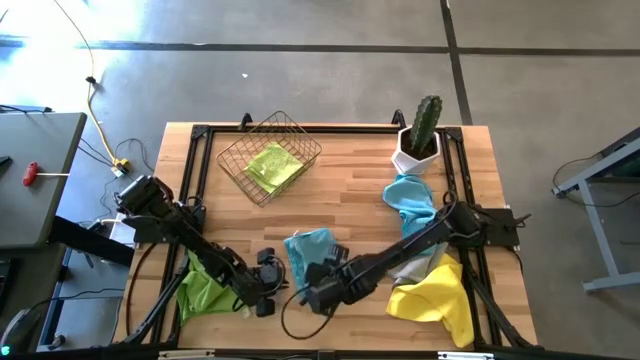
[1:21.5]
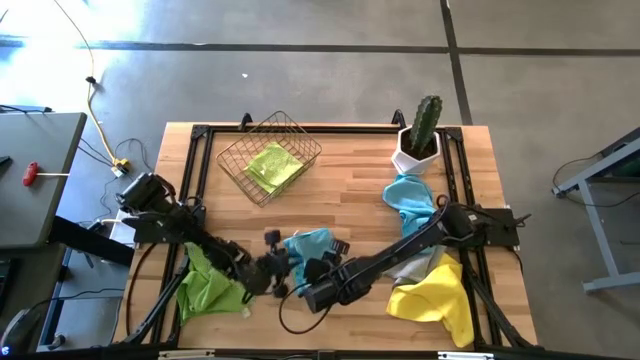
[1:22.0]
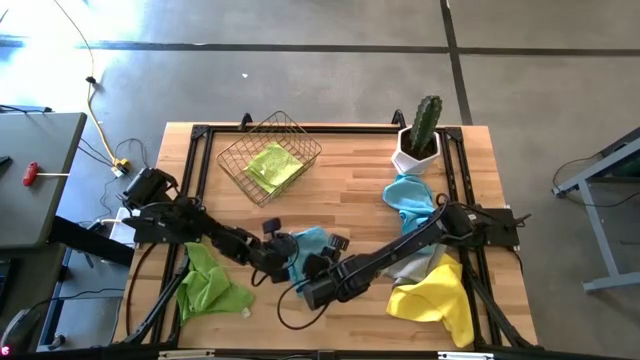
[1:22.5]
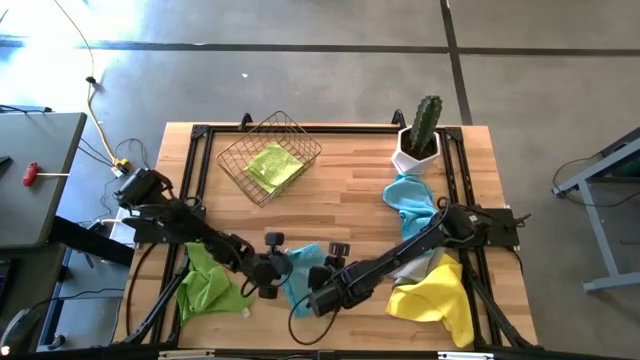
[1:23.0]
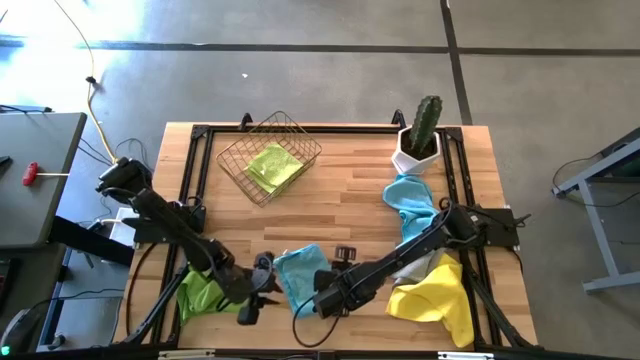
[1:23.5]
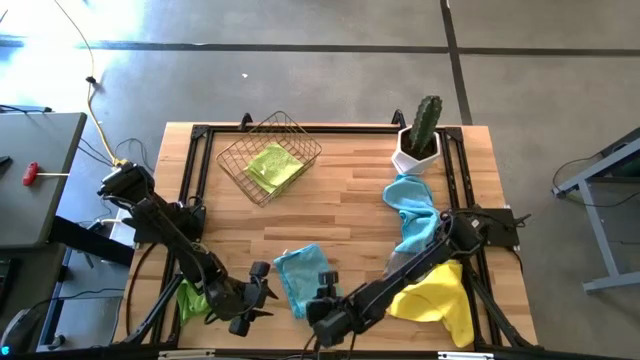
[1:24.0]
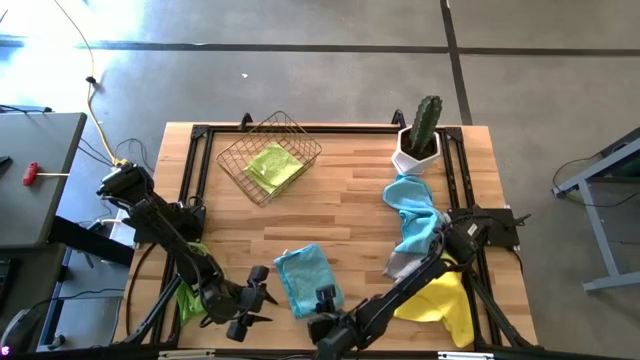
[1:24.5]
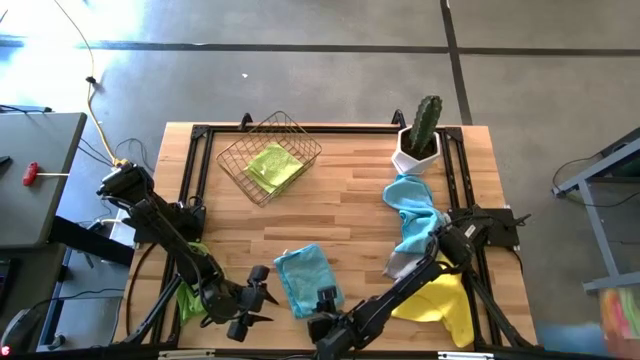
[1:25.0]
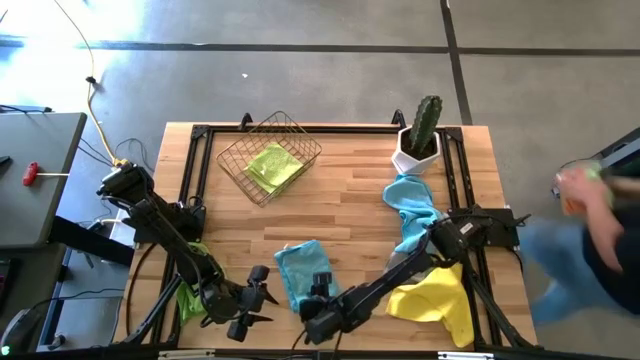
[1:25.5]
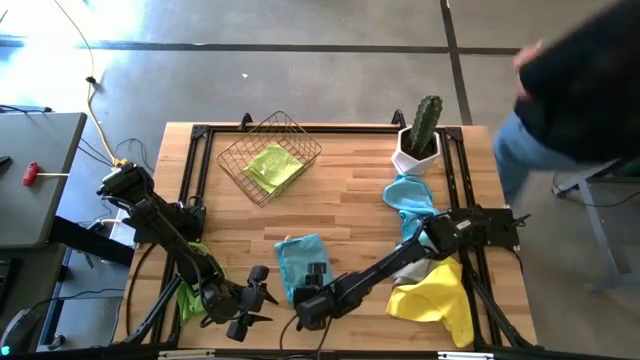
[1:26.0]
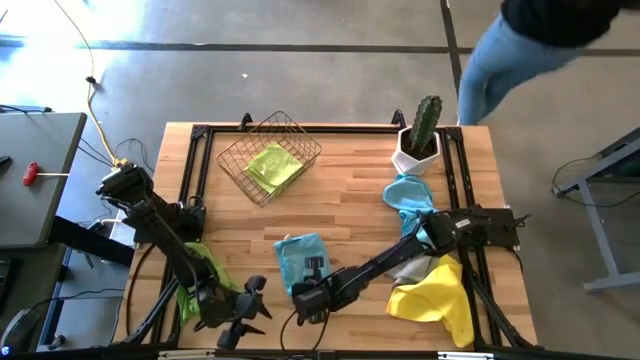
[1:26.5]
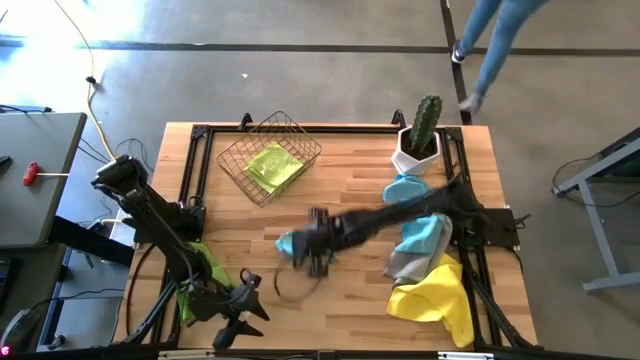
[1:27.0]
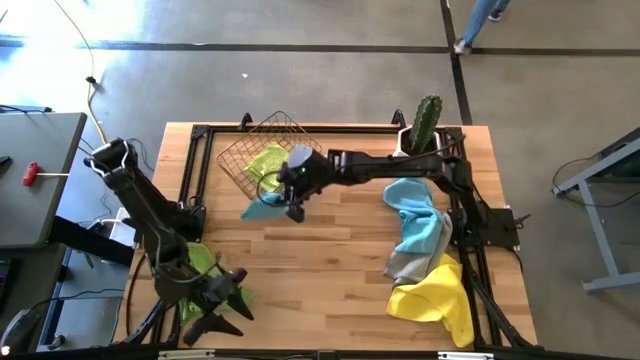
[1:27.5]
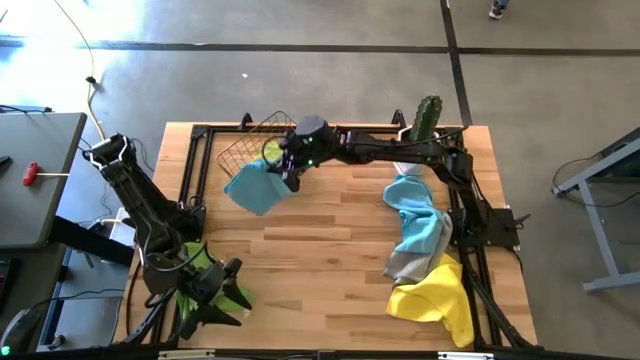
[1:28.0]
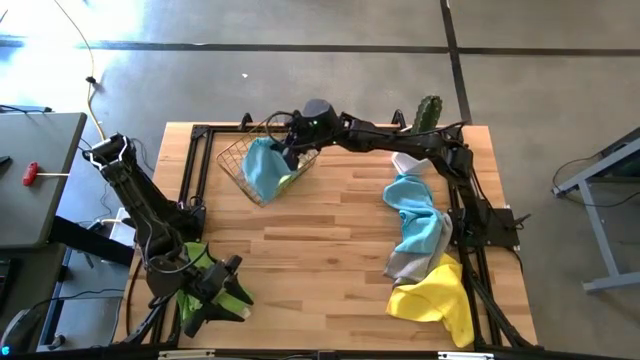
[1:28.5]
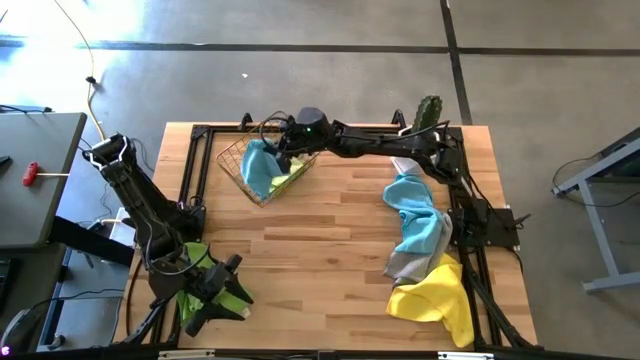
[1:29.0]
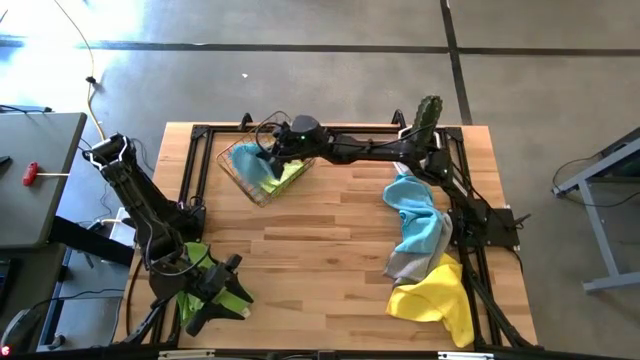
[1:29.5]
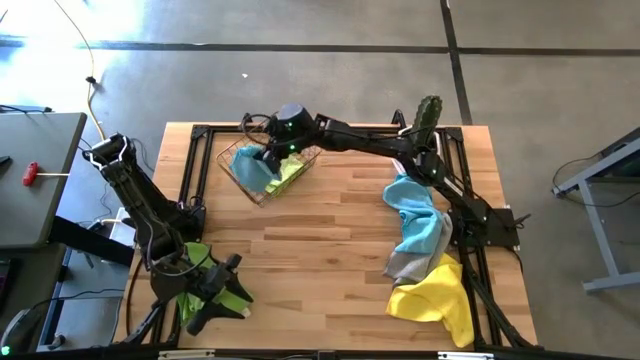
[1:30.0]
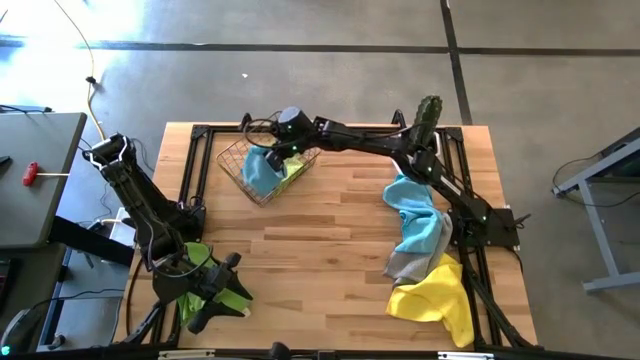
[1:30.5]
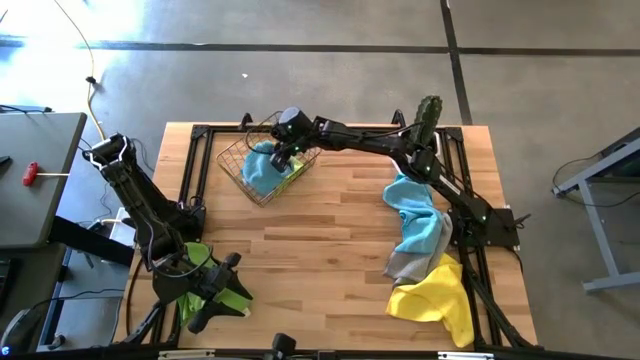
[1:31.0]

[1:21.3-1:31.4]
Task: Fold microfiber towels
Put the folded light blue microfiber towel into the wire basket

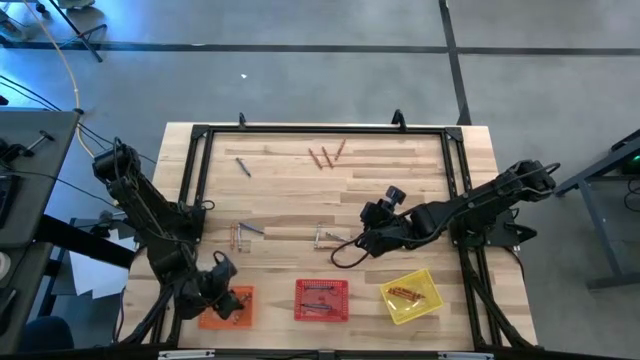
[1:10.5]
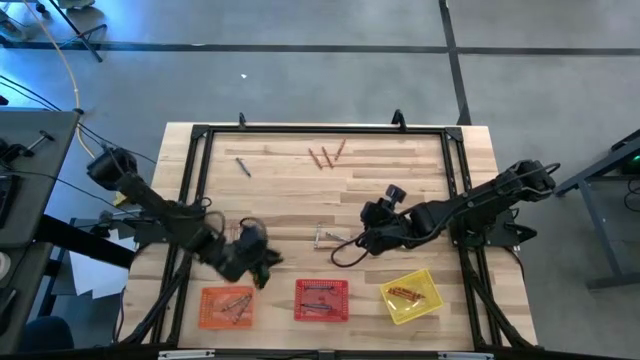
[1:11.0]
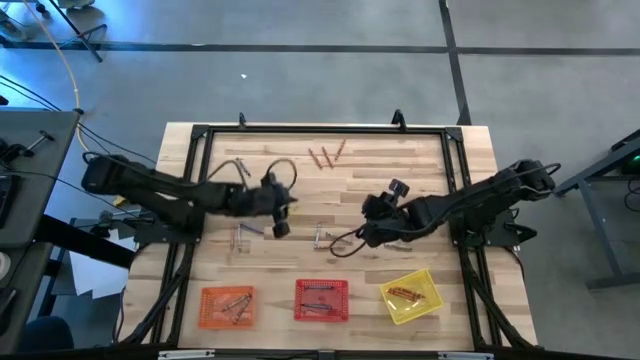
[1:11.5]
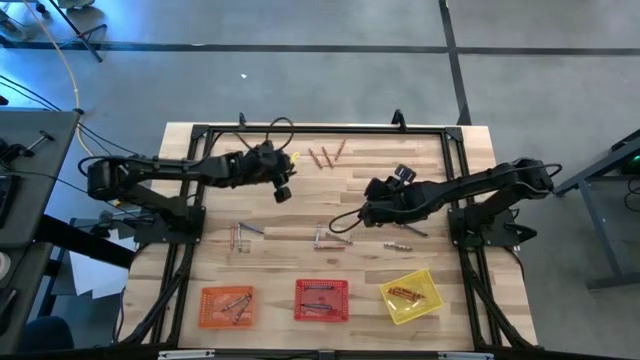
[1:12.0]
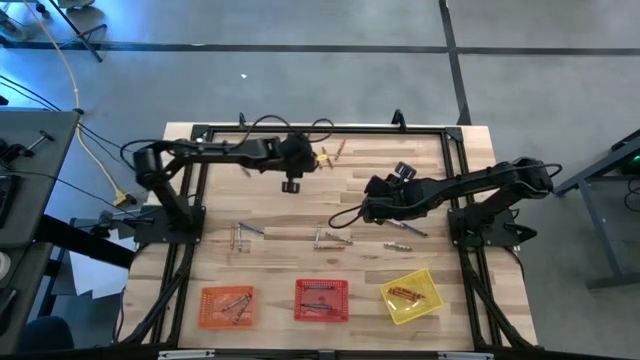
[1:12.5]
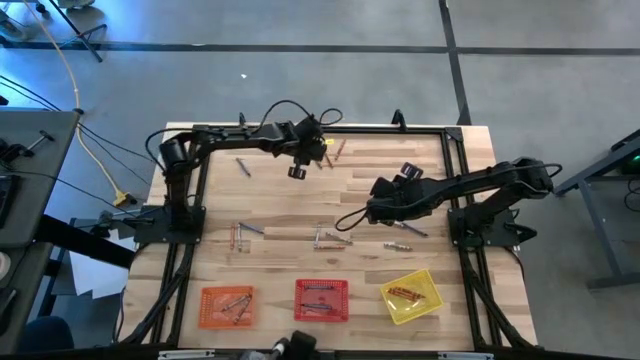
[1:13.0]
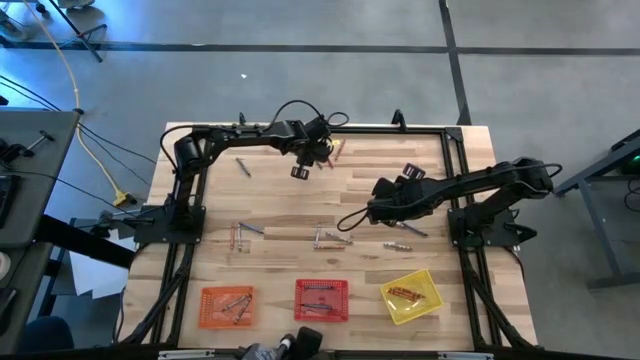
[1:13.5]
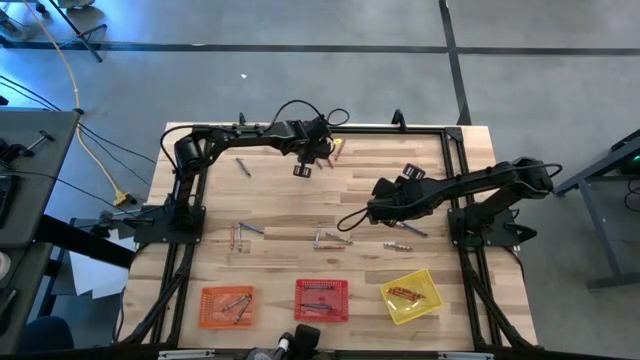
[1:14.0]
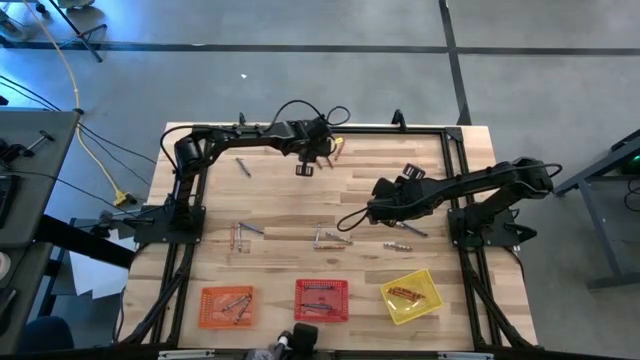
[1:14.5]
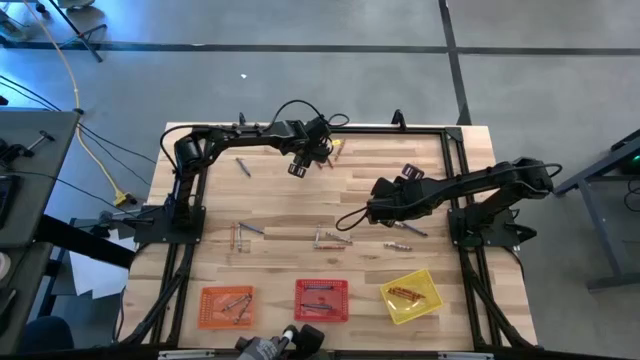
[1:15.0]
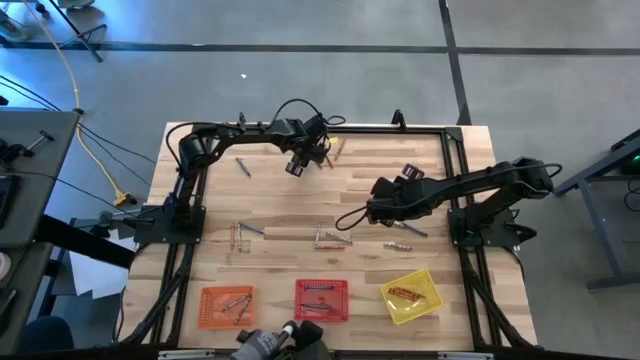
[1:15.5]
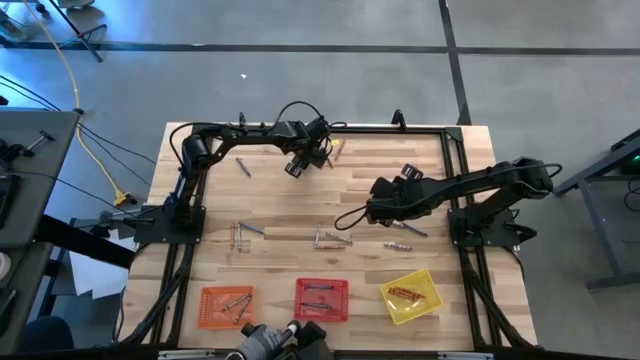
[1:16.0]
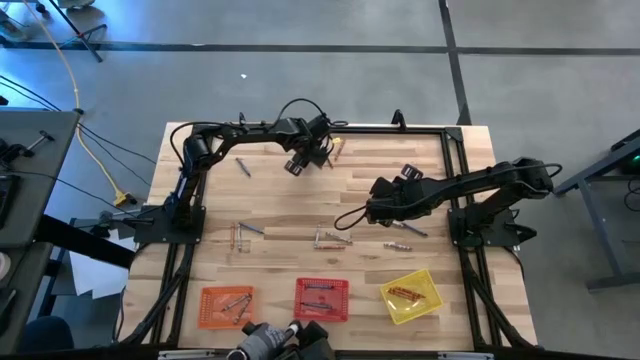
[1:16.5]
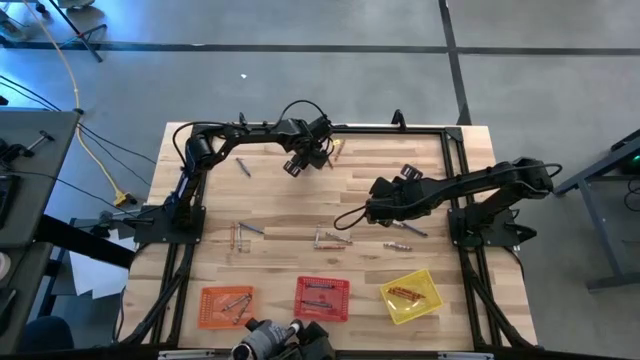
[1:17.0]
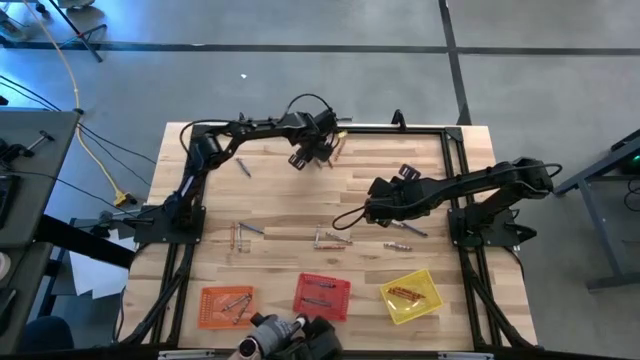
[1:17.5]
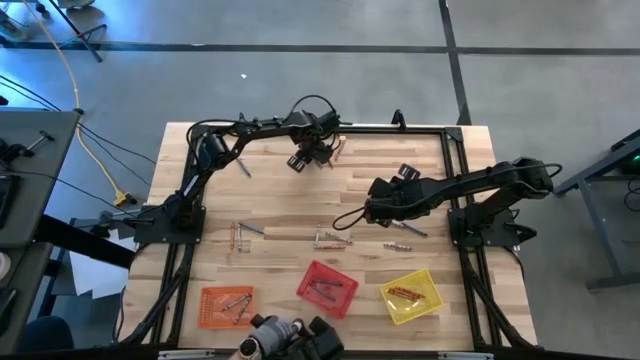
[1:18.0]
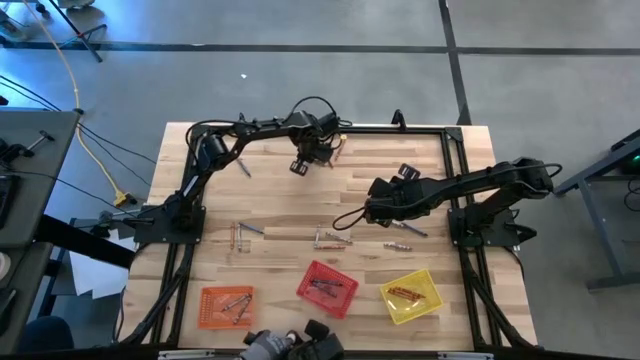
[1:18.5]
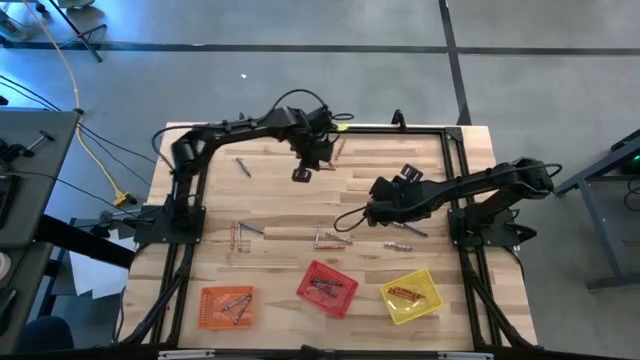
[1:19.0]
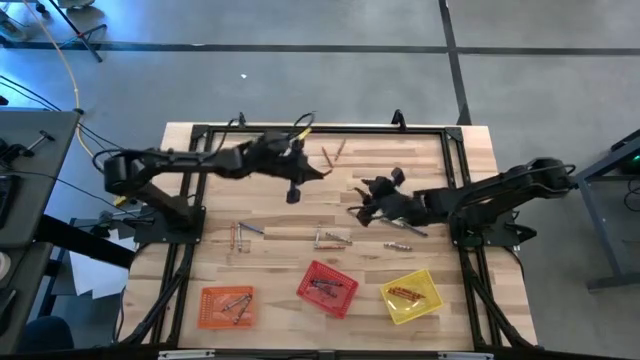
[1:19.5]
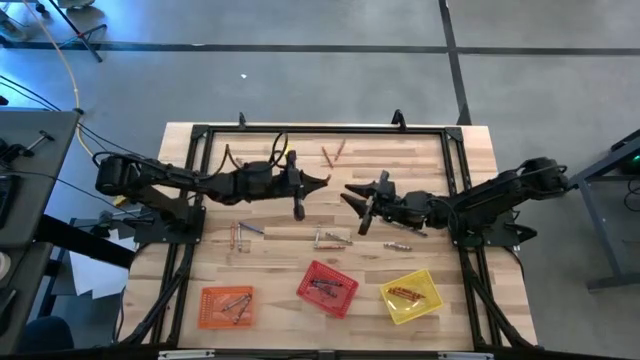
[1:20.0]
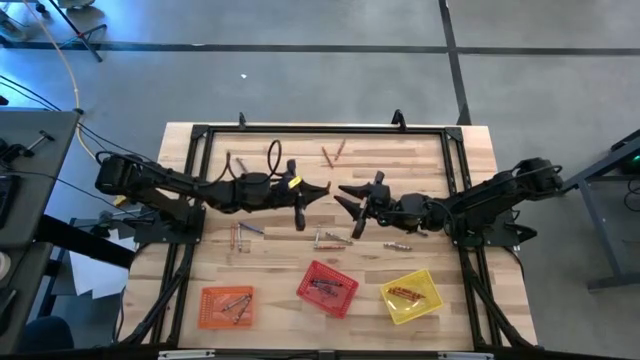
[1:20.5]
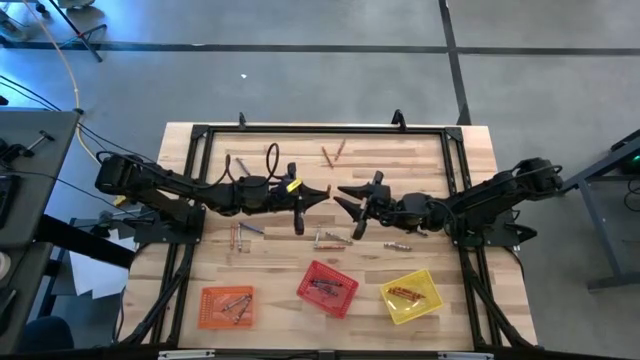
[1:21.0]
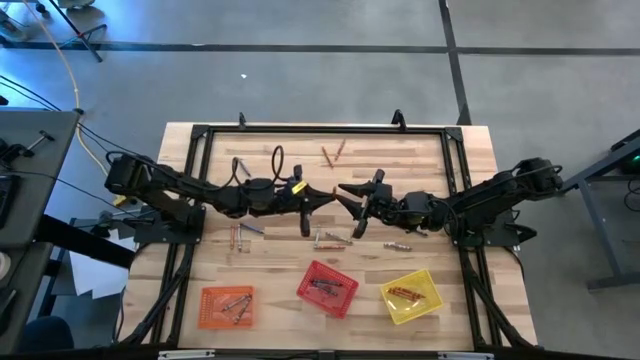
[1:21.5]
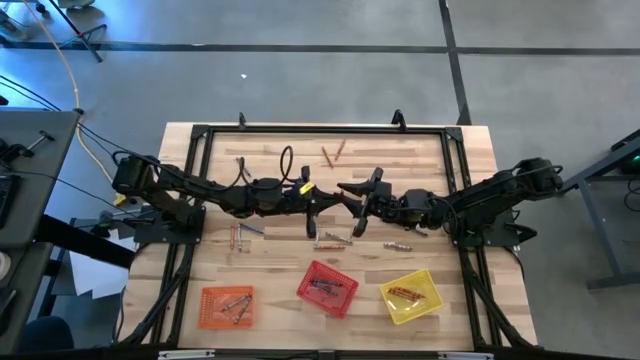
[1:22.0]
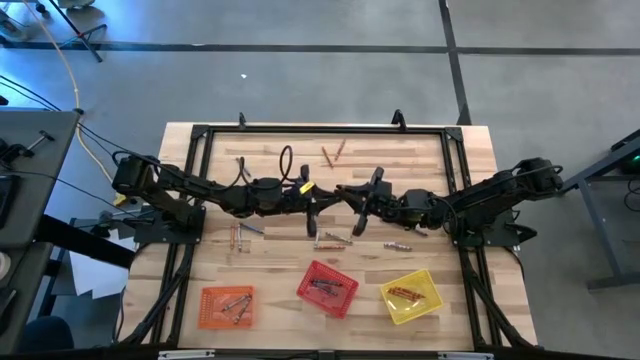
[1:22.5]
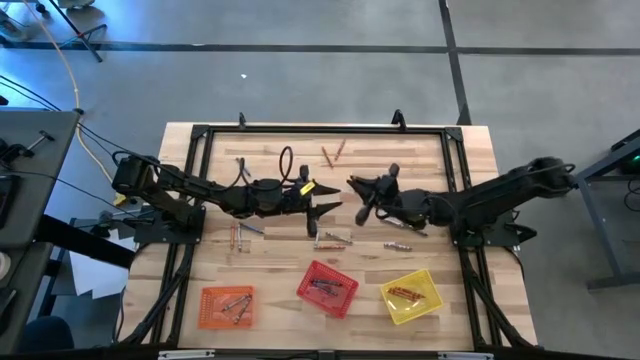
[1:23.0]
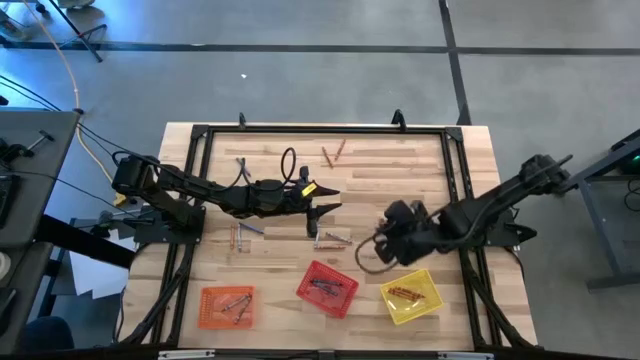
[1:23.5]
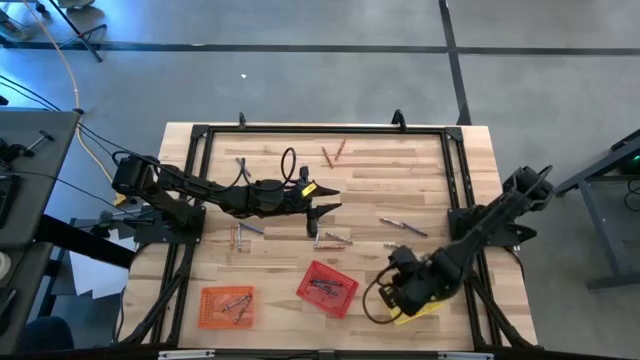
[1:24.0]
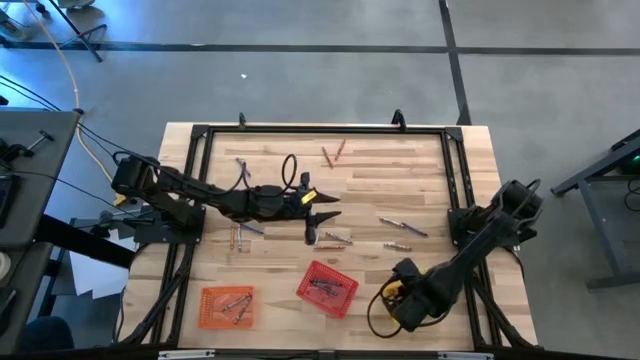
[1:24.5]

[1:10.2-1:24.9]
Task: Sort crayons
Put the orange crayon into the yellow bin
